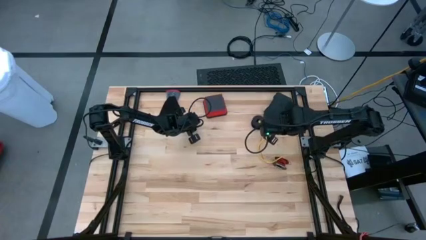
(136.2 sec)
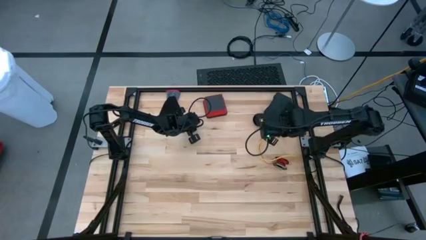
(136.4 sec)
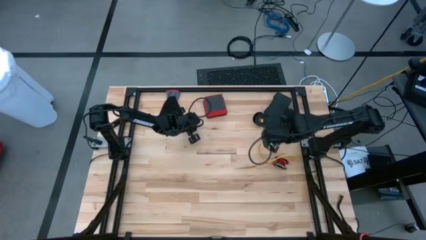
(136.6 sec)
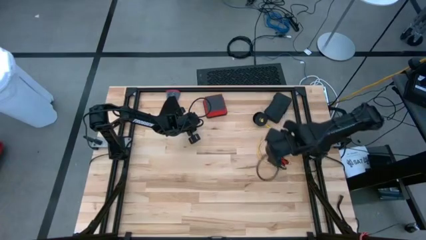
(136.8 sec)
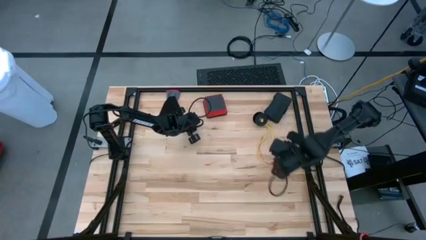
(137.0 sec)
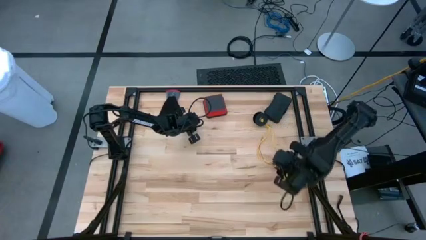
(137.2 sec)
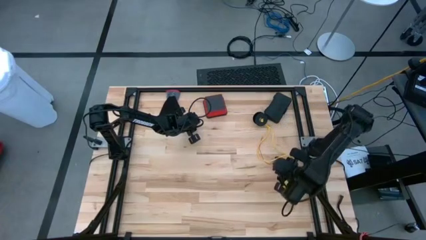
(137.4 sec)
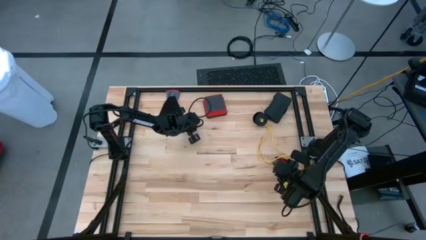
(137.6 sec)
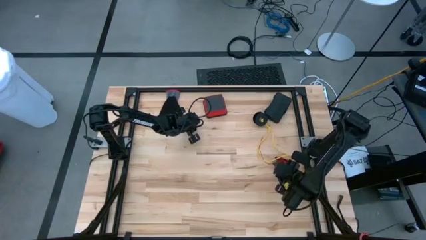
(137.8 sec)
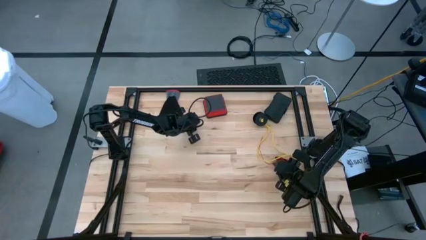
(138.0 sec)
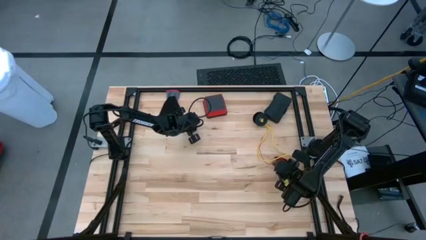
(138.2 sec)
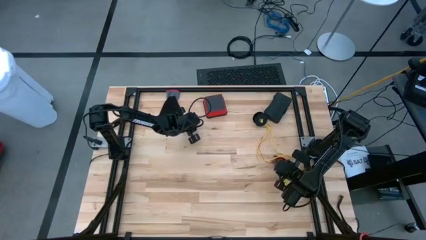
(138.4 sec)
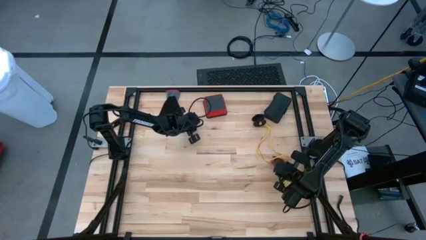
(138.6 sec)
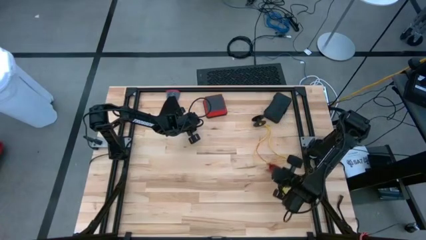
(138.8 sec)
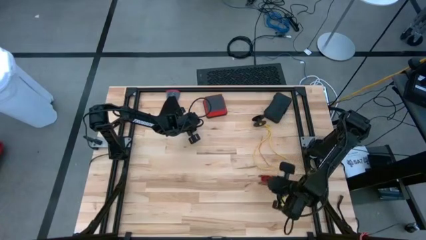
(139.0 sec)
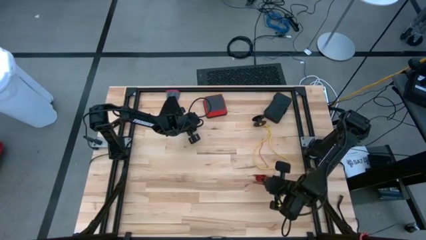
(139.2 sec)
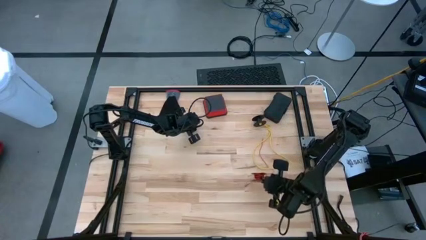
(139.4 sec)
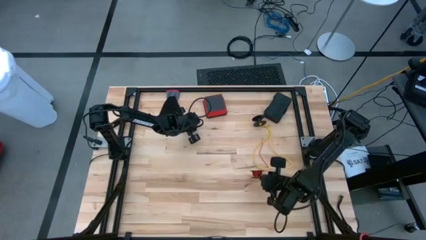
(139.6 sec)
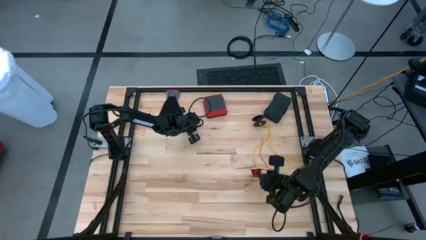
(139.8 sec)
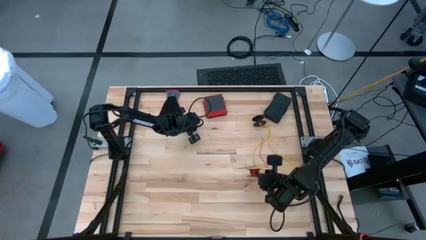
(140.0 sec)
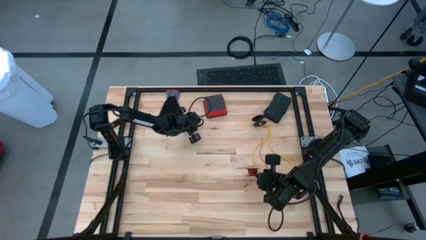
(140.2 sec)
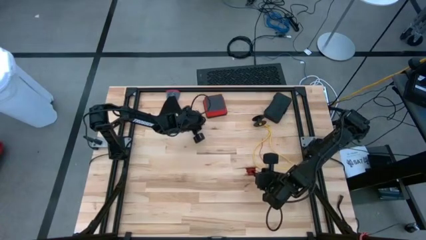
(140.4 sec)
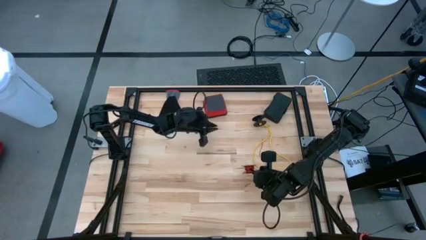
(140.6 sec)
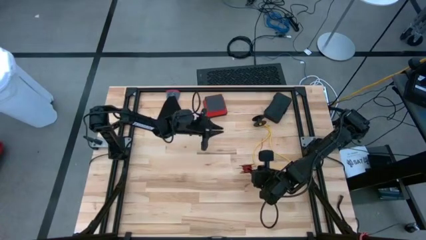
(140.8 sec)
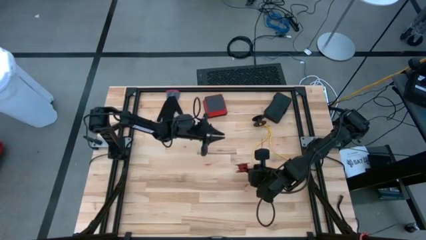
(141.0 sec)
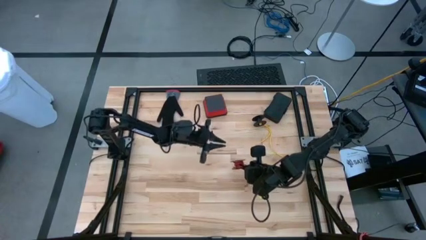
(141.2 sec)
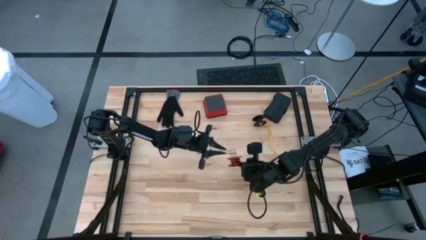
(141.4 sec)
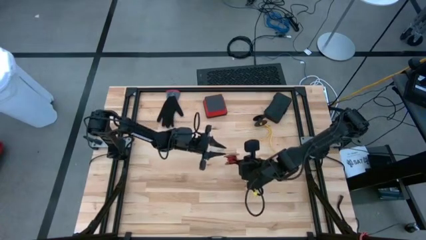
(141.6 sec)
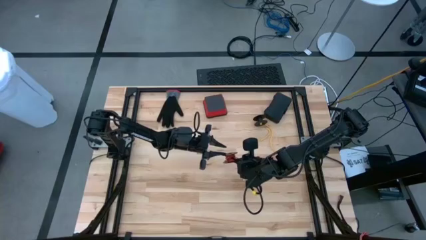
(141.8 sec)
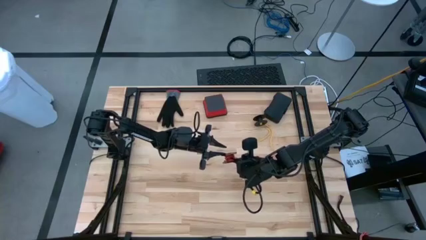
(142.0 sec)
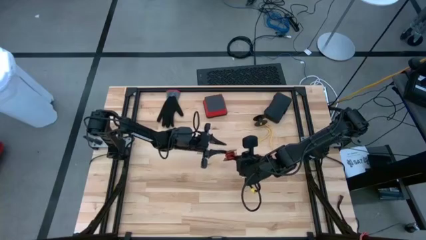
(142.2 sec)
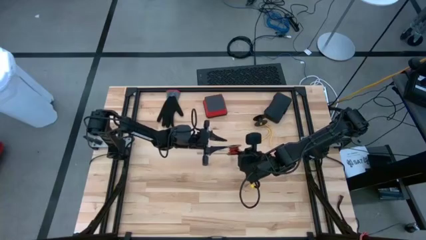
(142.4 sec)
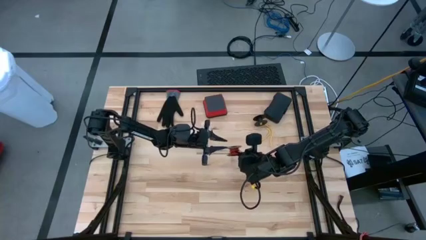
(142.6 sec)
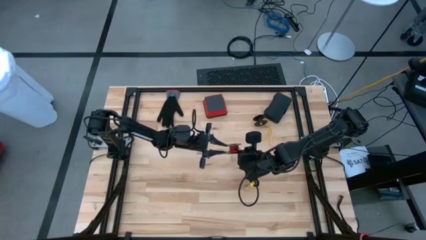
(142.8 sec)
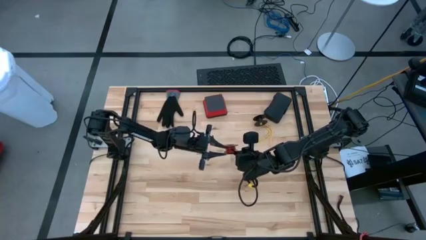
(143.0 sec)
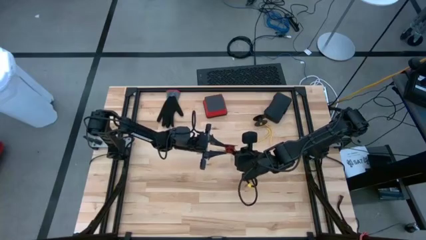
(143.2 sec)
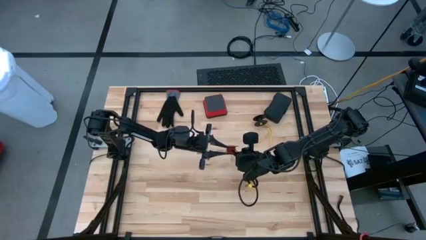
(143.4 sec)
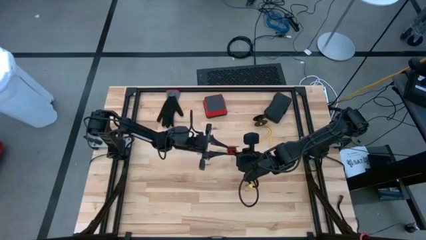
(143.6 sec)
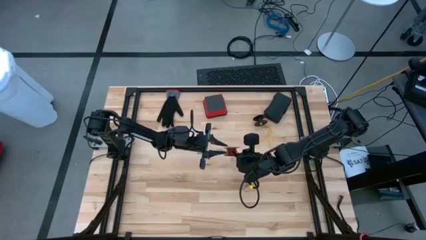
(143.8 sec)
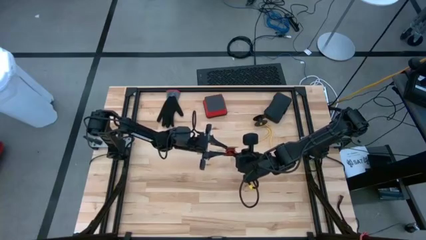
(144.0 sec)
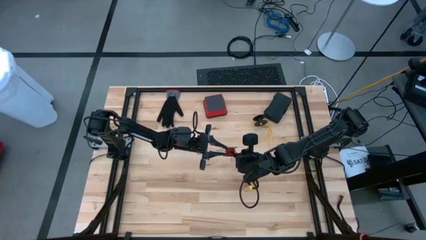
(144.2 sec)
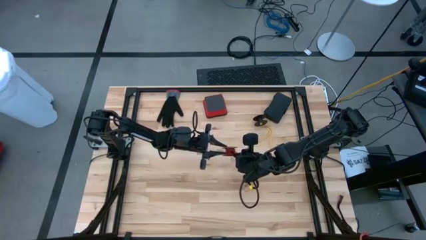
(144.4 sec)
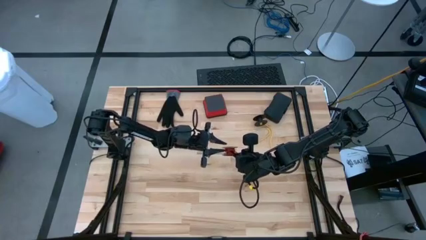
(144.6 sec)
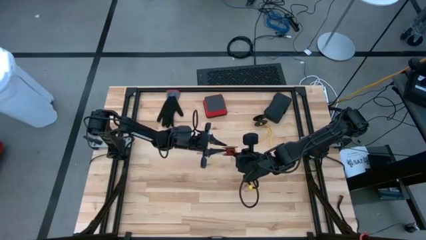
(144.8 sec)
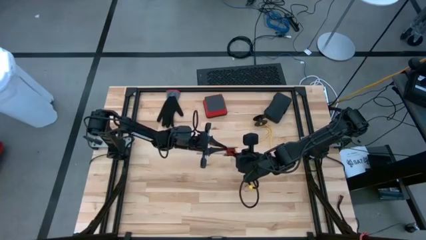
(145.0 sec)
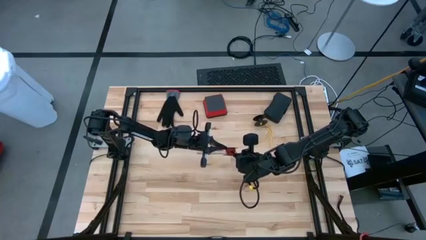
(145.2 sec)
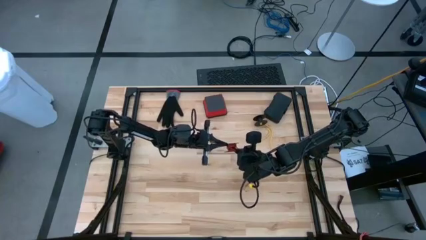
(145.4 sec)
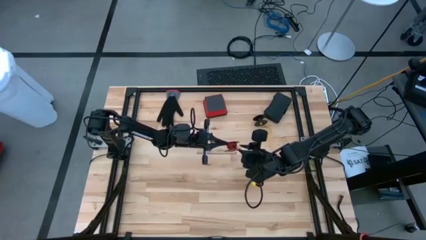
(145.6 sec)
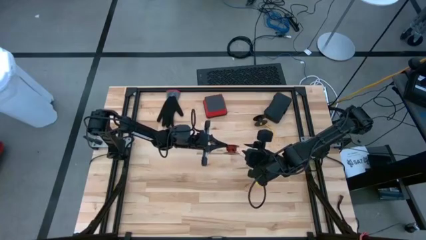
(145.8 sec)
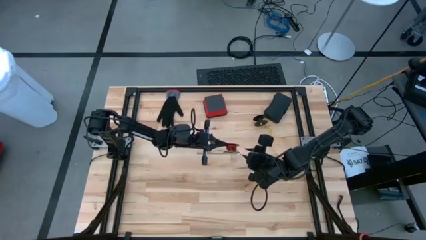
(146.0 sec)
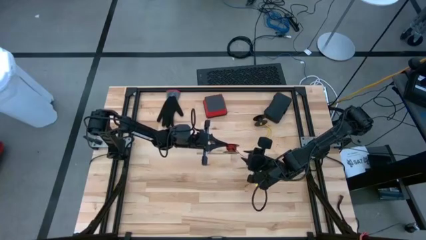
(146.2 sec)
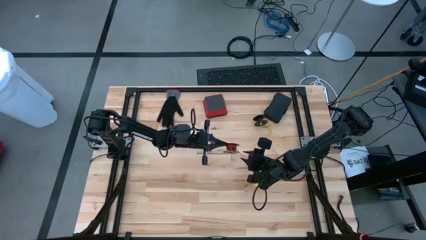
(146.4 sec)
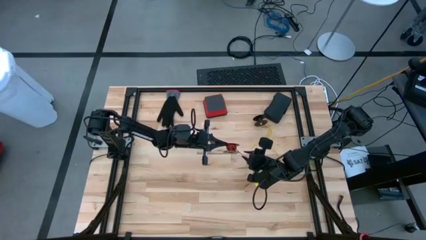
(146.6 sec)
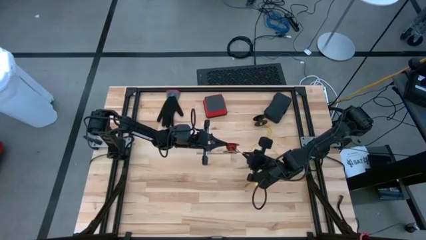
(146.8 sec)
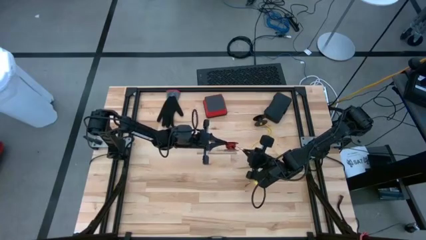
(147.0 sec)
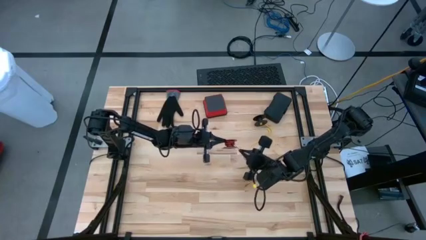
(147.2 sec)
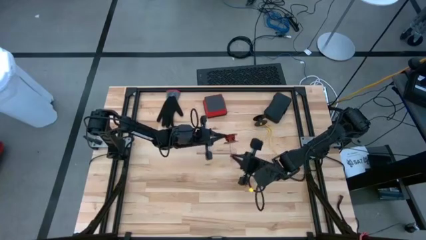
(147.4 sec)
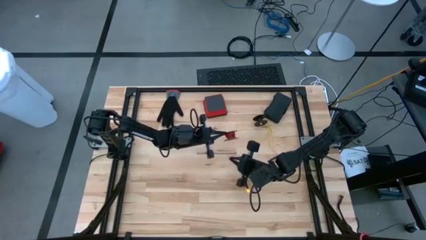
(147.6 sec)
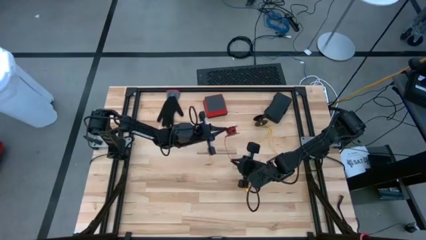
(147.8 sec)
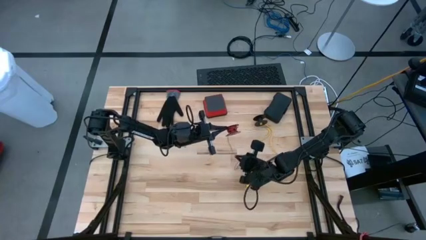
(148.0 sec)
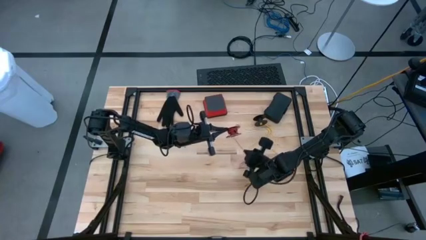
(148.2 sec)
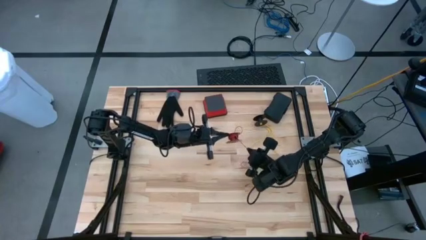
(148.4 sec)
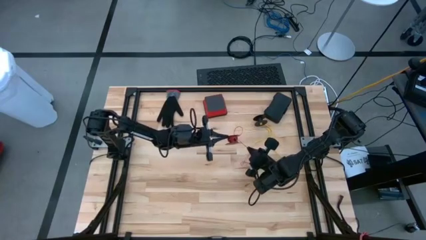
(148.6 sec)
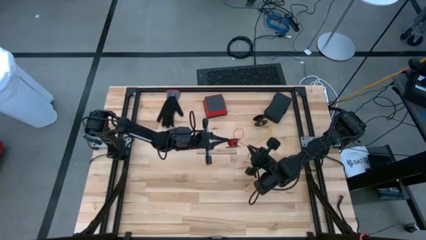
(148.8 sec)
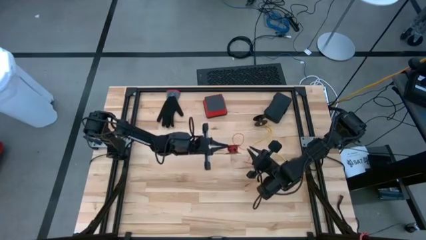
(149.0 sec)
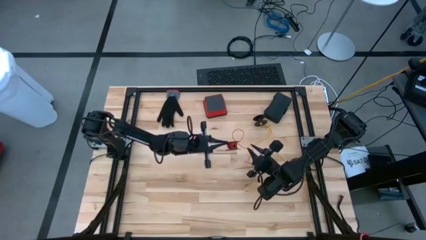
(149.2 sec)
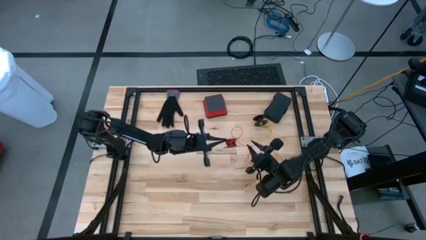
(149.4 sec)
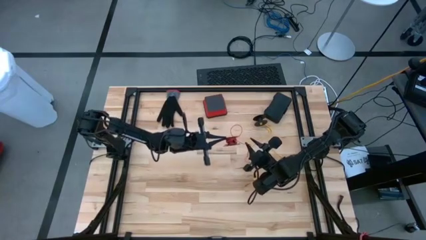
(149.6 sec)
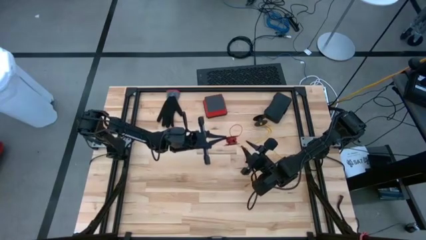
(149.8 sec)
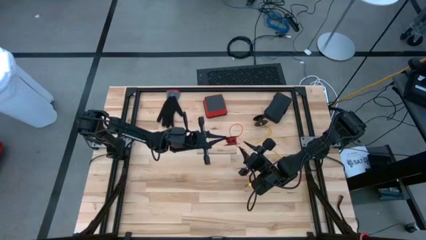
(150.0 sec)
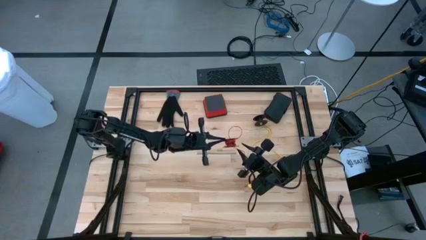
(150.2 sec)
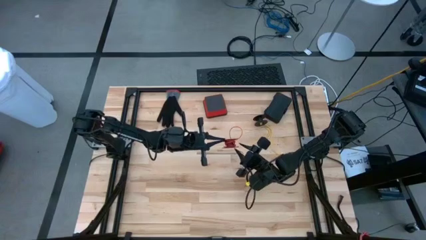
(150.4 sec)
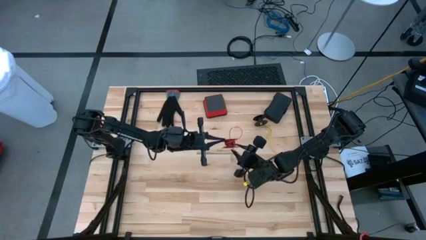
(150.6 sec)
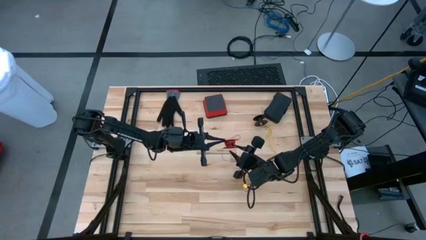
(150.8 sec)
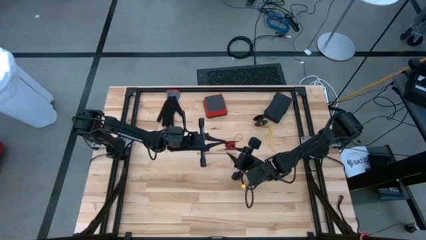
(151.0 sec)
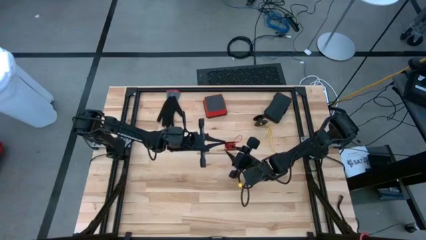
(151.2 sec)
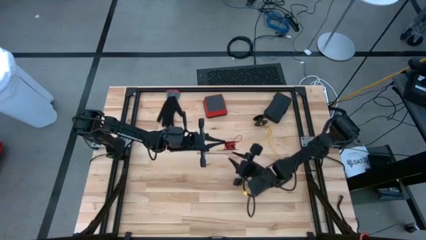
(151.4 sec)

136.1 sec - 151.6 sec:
Task: Coil cords
Uncoil the red wire from the spool

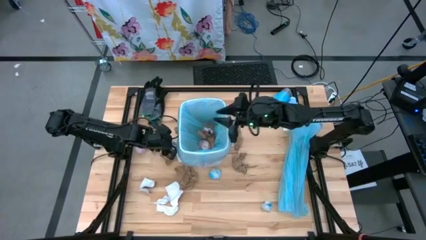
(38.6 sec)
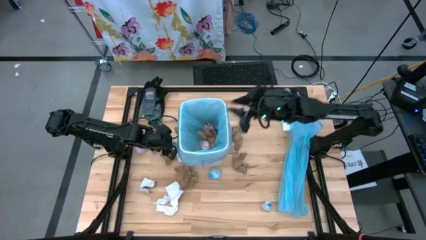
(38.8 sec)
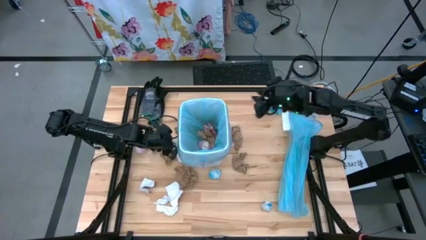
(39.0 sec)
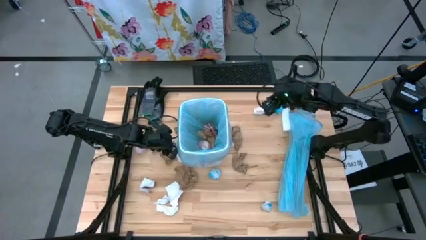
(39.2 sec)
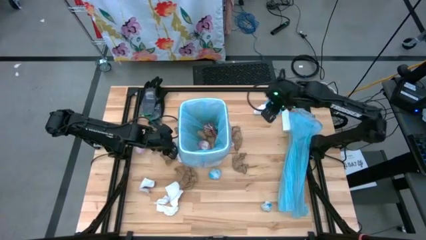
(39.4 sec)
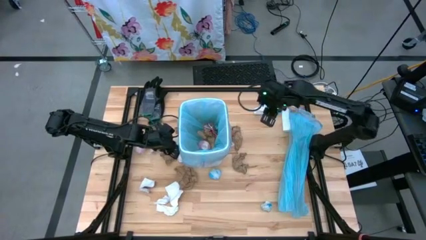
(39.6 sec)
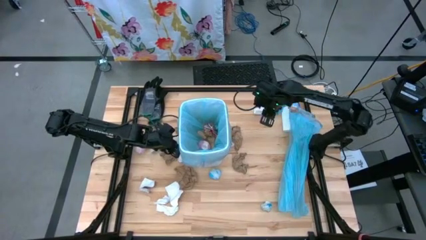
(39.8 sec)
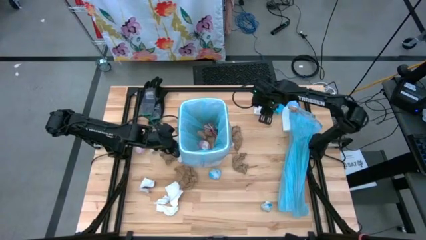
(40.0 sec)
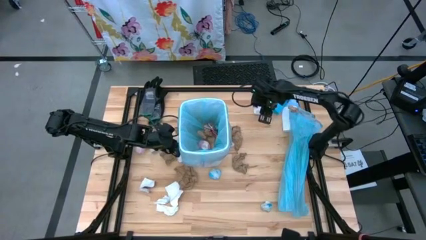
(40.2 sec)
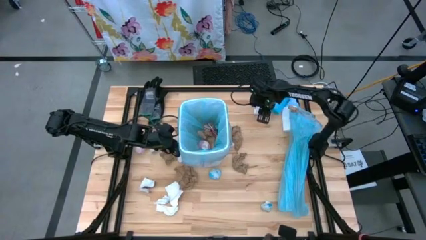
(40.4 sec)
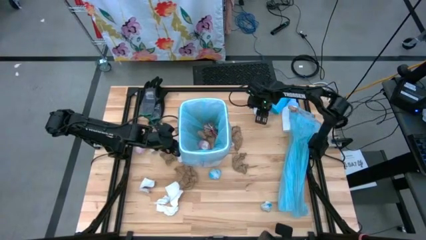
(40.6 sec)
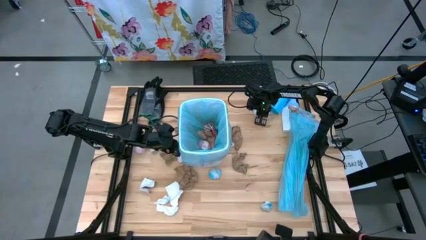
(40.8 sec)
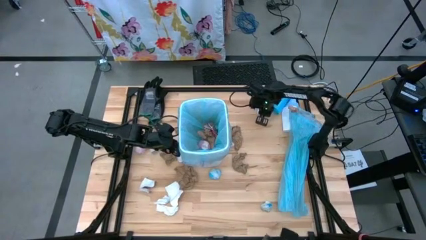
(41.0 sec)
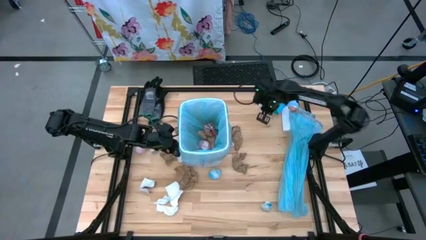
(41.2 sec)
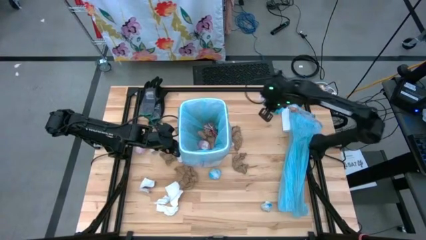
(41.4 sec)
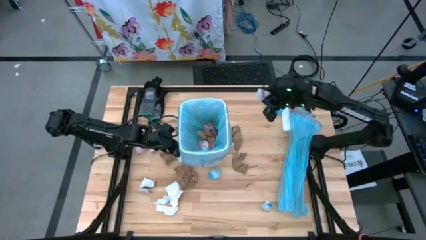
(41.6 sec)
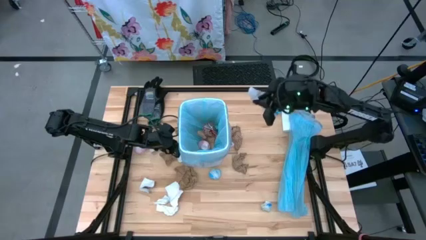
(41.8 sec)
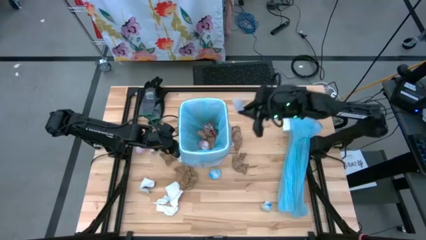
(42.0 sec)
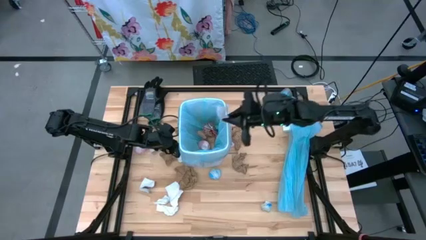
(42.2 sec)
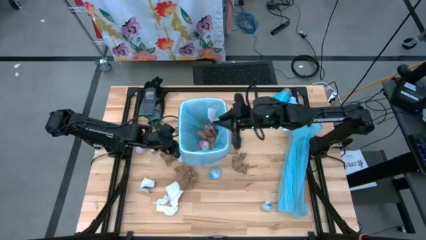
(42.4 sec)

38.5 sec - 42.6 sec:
Task: place trash/remove bag and relplace
Put the white paper into the trash bin
